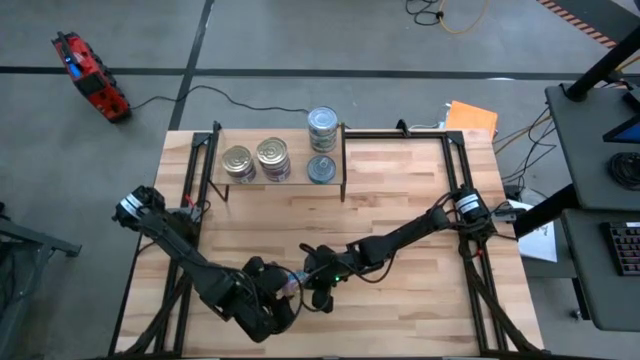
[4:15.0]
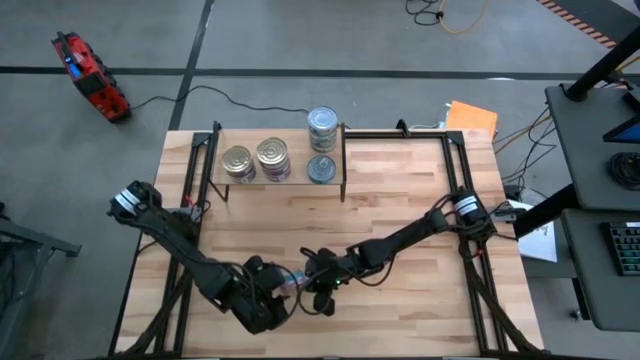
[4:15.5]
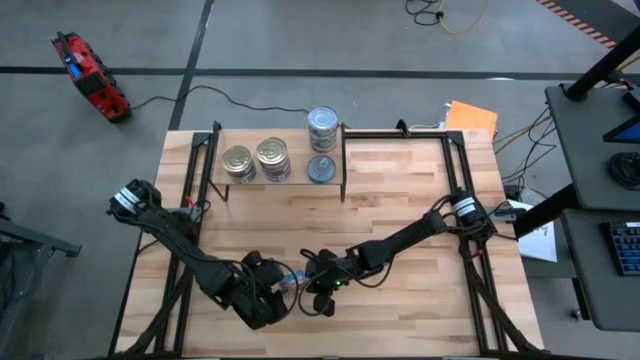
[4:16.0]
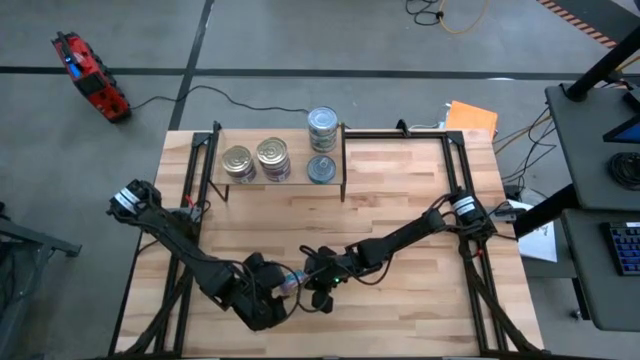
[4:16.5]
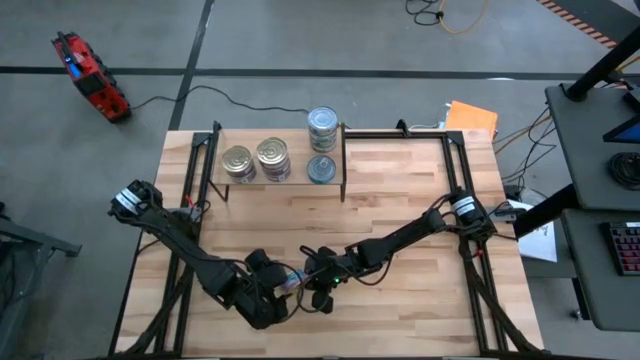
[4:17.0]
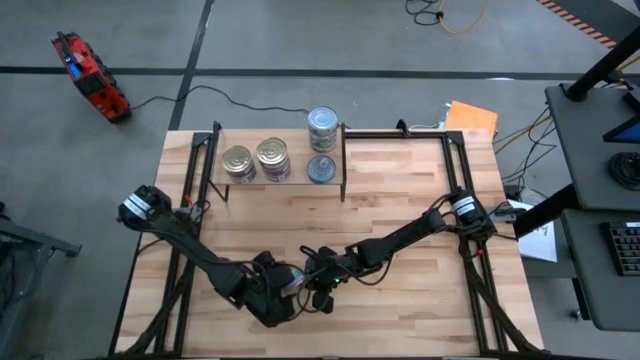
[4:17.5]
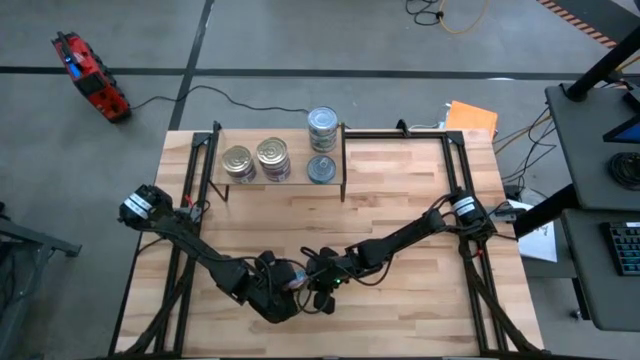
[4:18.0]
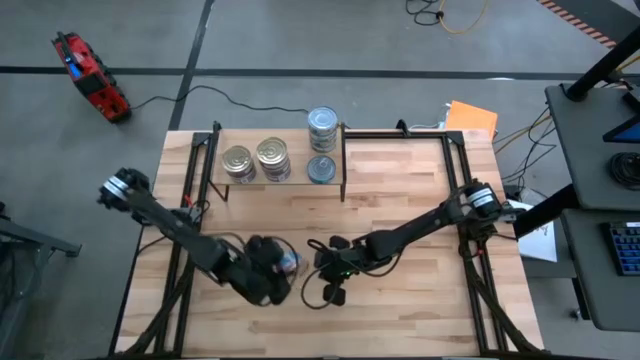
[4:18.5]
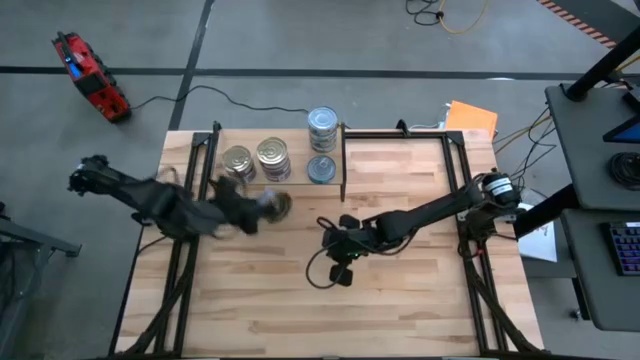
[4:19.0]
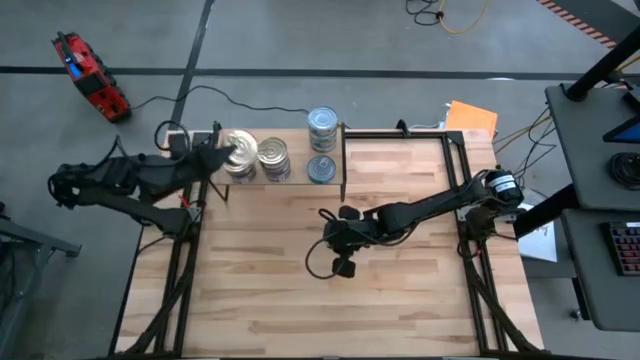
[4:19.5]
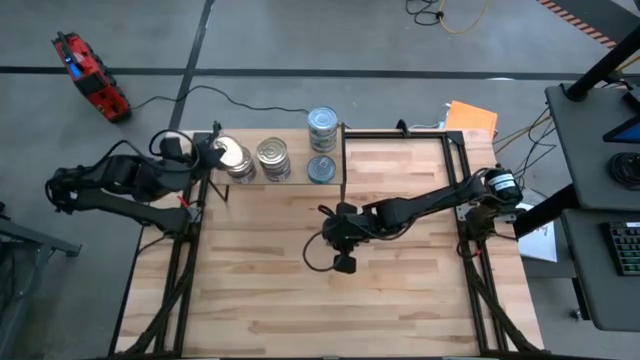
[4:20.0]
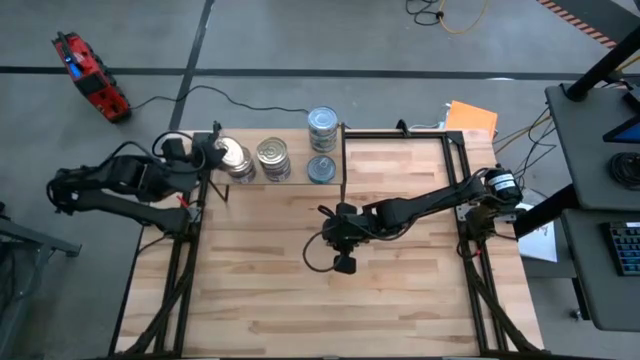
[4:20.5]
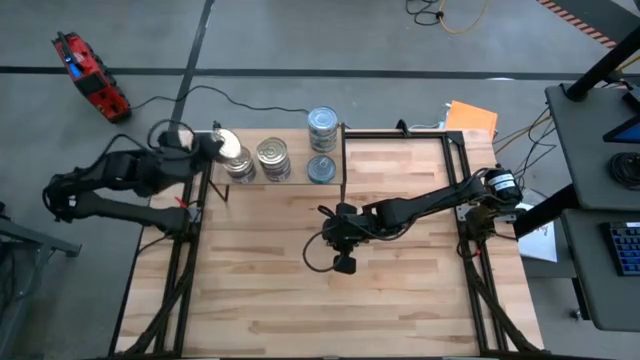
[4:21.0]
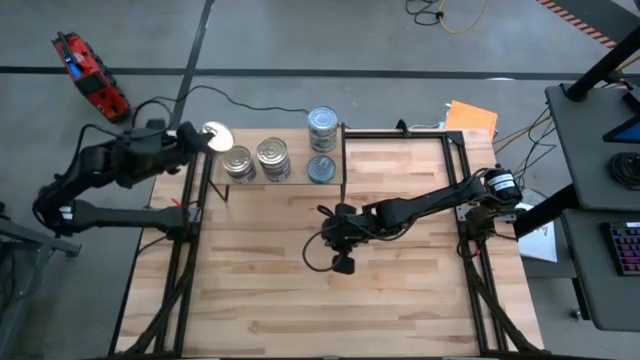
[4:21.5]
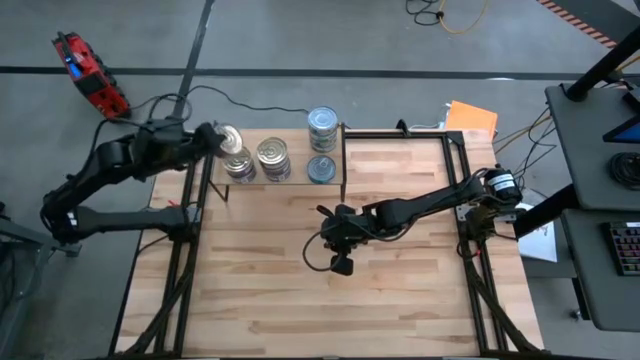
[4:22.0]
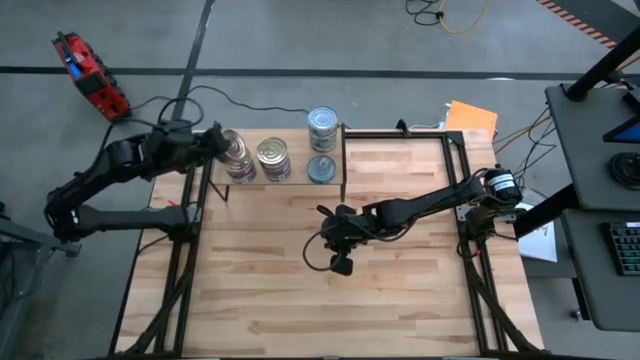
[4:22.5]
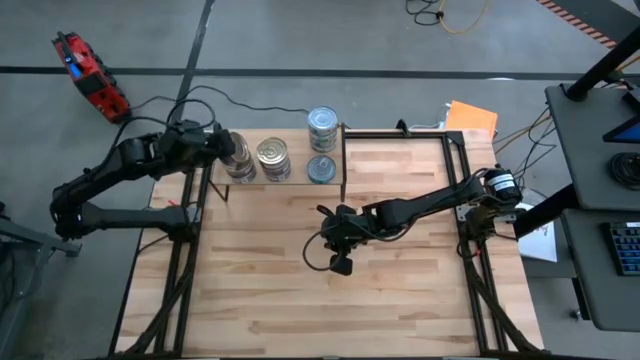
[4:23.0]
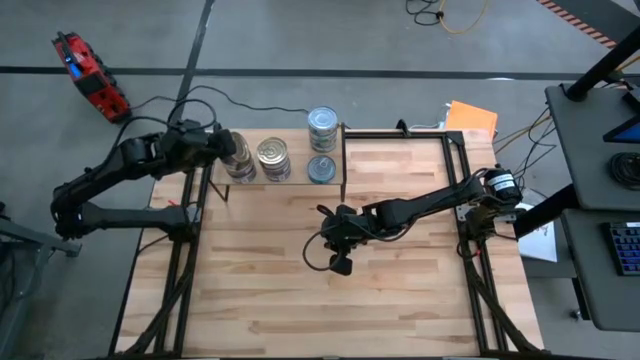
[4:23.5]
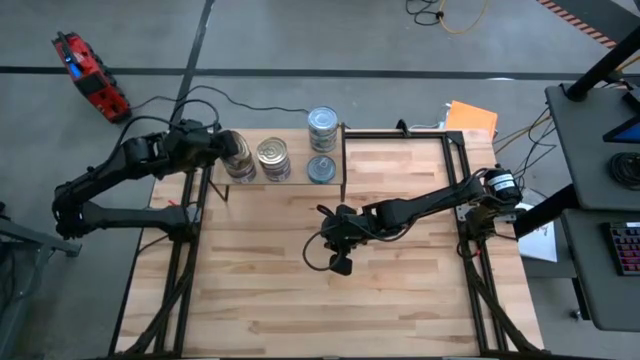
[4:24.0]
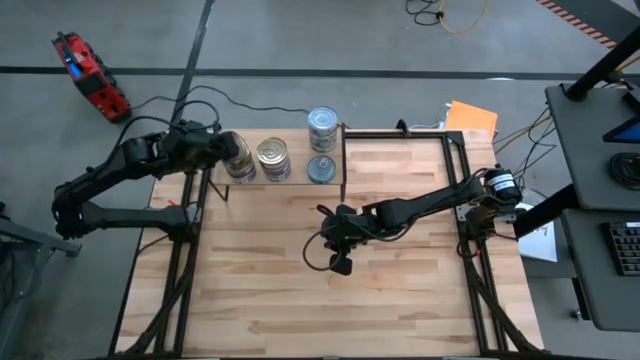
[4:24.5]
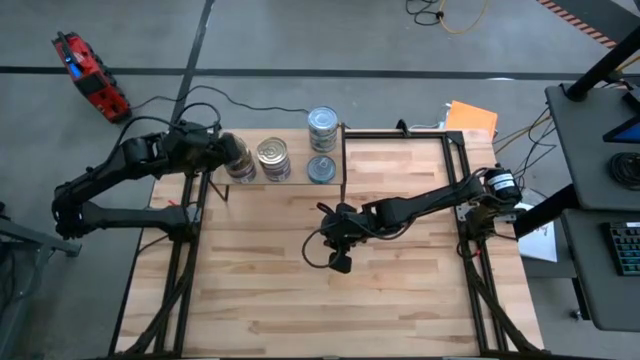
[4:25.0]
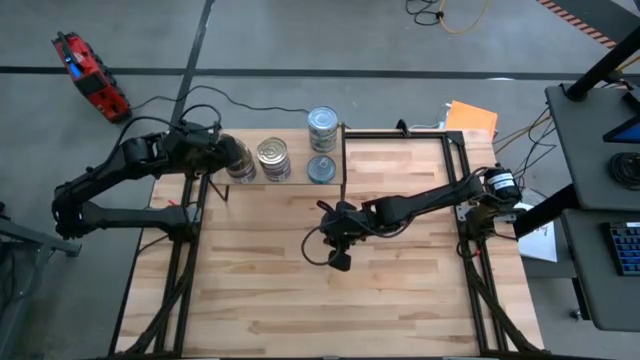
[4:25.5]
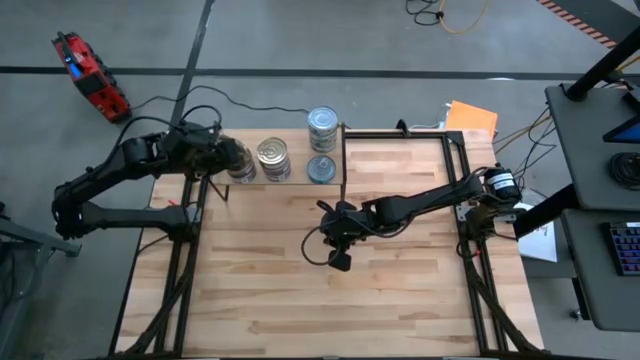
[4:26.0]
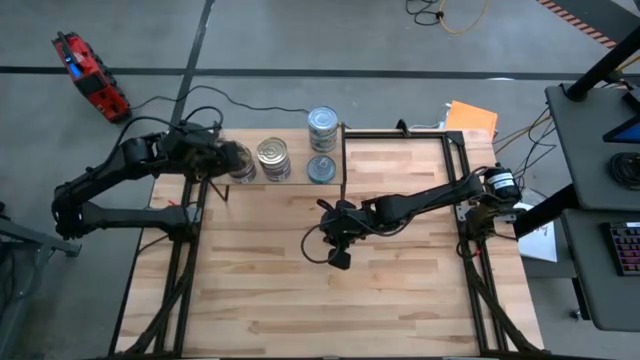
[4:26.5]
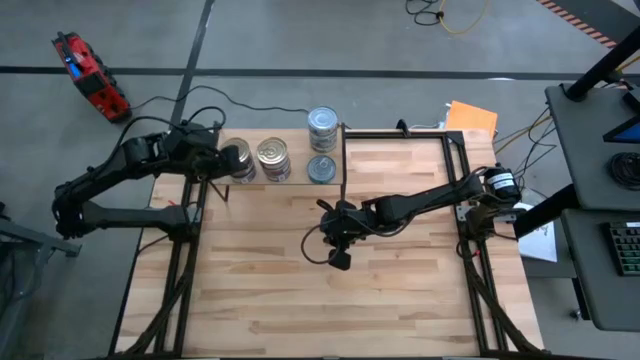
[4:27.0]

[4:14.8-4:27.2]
Task: Stack canned seafood by type on shelf
Stack the blue and pink tuna can on top of the blue and pink tuna can on the shelf

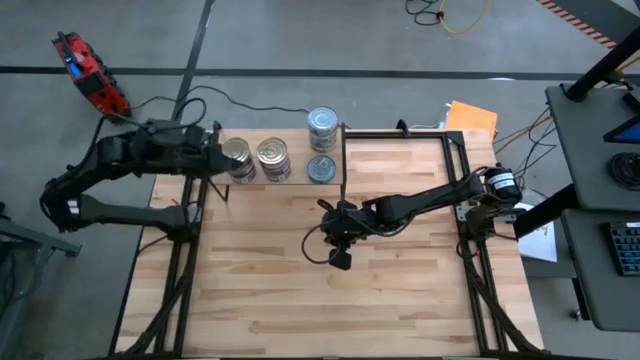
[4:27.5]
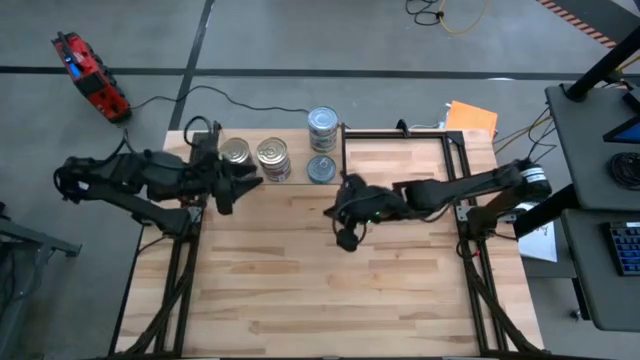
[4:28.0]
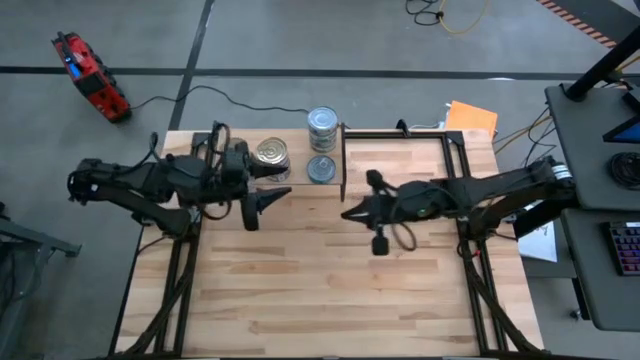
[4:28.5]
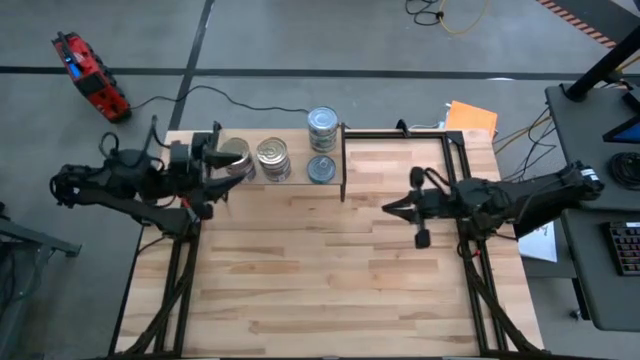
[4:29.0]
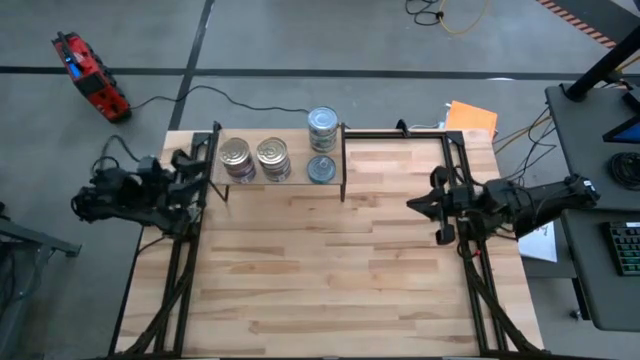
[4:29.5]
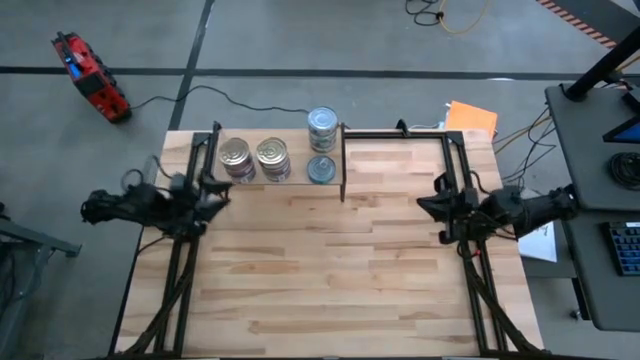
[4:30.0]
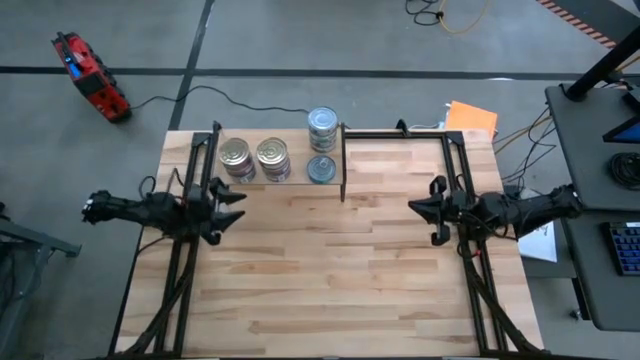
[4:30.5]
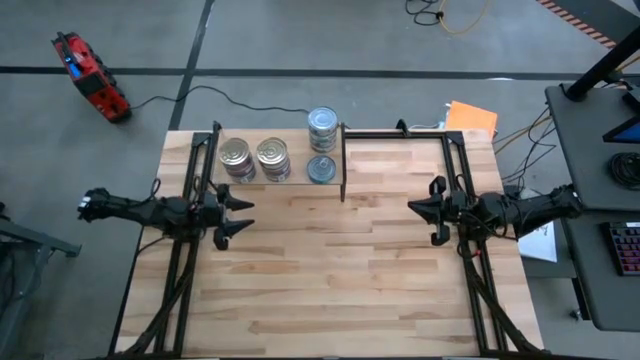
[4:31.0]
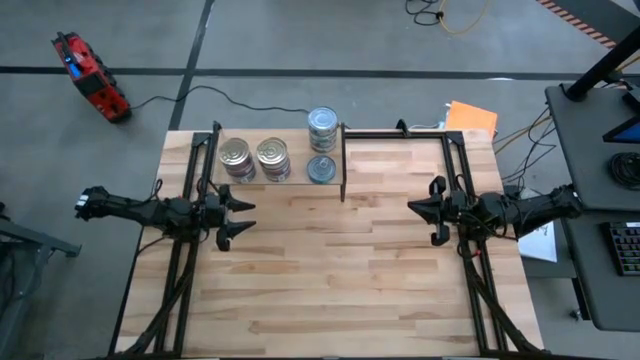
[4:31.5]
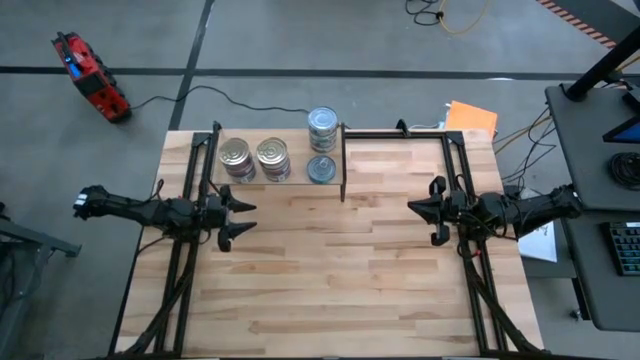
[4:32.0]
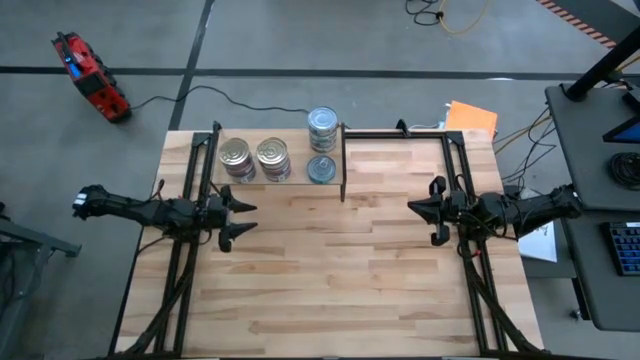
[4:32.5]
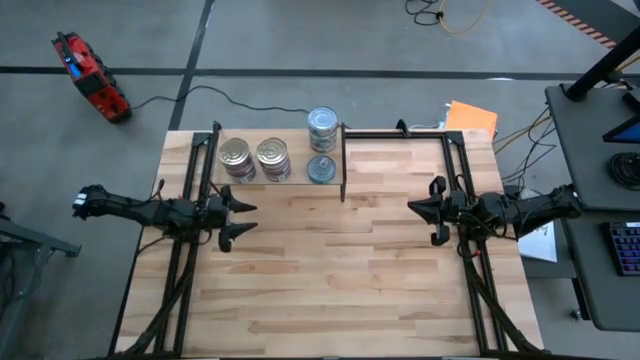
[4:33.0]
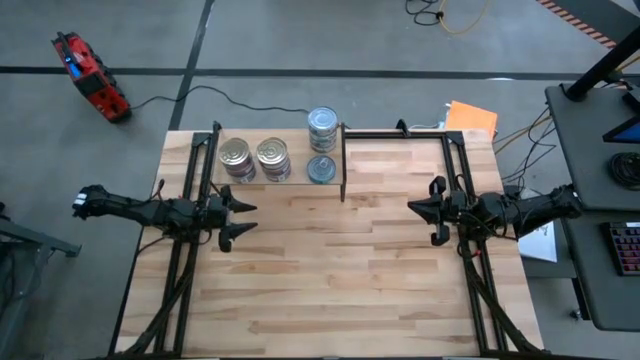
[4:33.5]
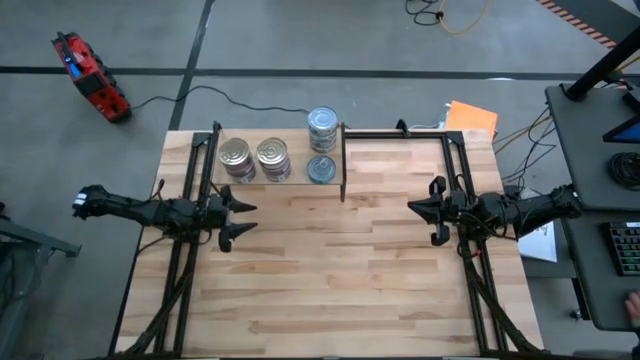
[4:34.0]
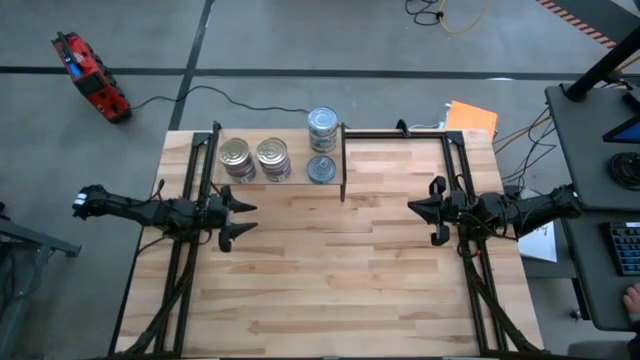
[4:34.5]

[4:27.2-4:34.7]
Return to Home Position

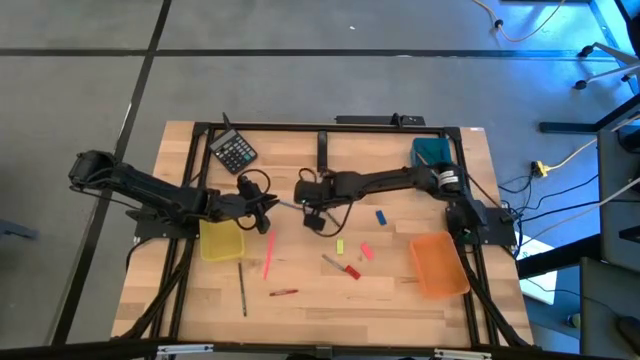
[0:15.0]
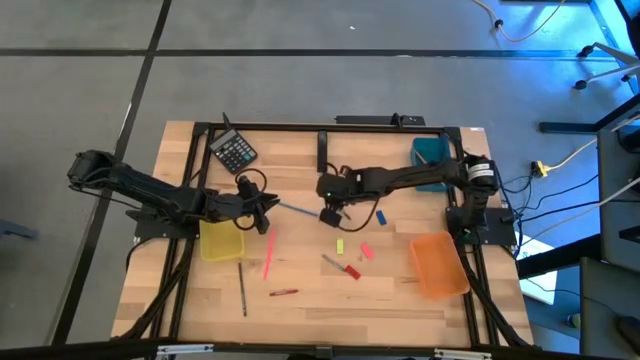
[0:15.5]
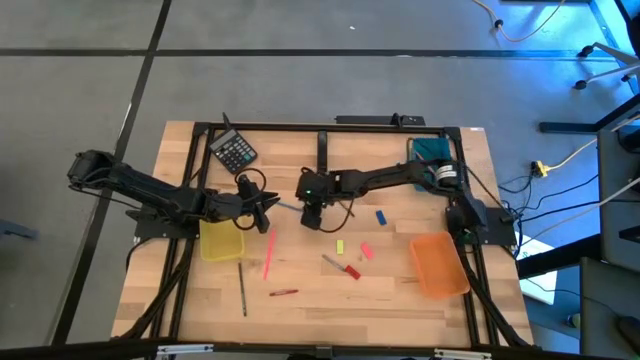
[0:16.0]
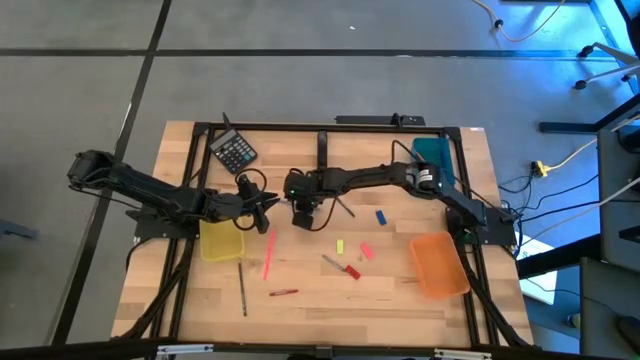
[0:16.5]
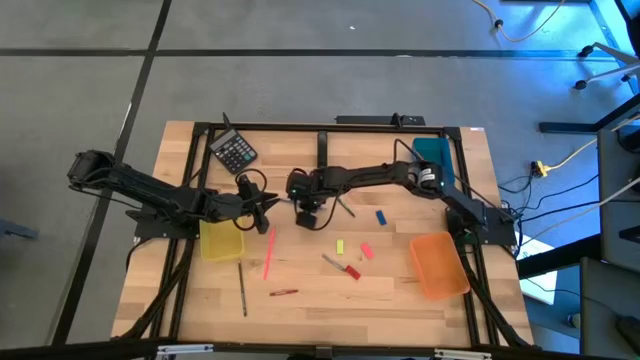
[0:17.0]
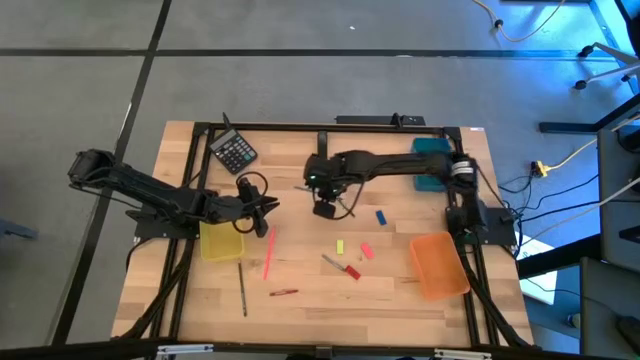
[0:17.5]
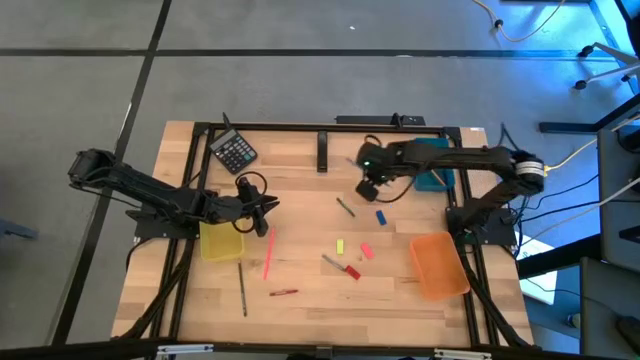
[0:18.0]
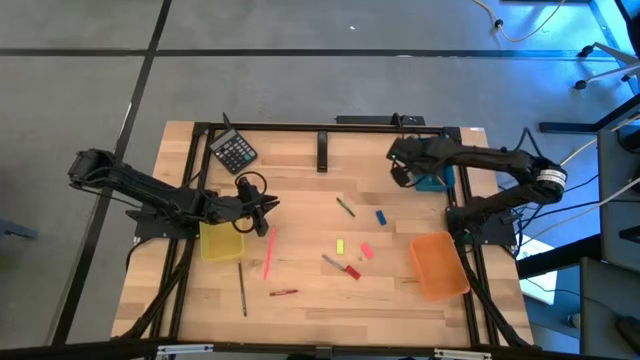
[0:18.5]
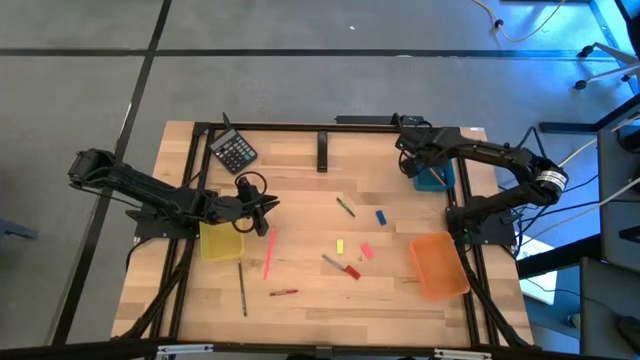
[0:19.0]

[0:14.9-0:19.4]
Task: Sort crayons/erasers/pens/pencils in bins
Put the blue pencil into the blue bin
